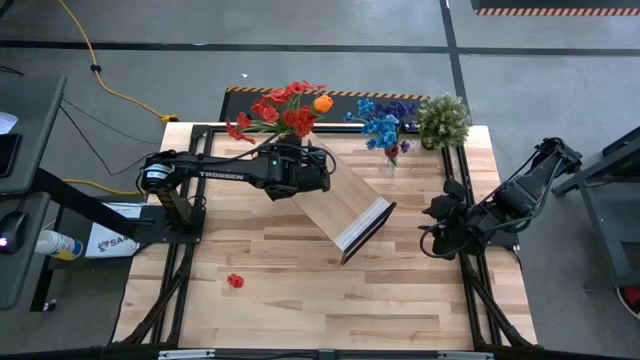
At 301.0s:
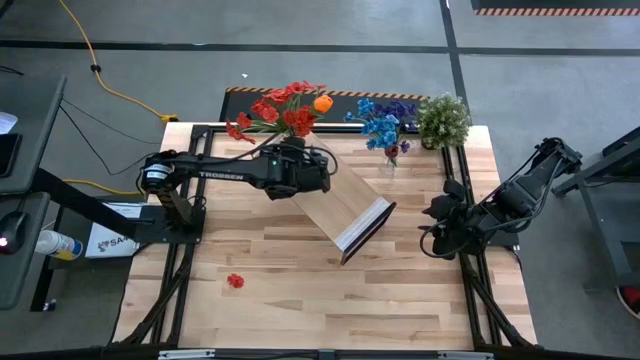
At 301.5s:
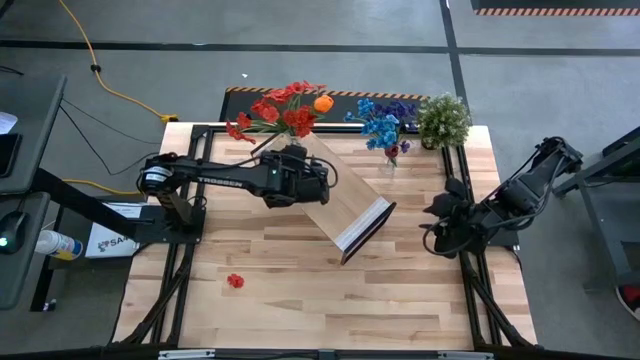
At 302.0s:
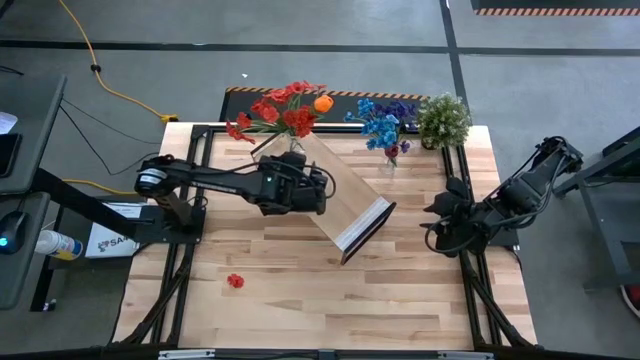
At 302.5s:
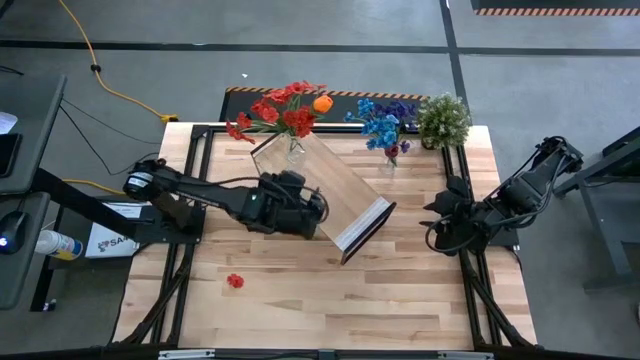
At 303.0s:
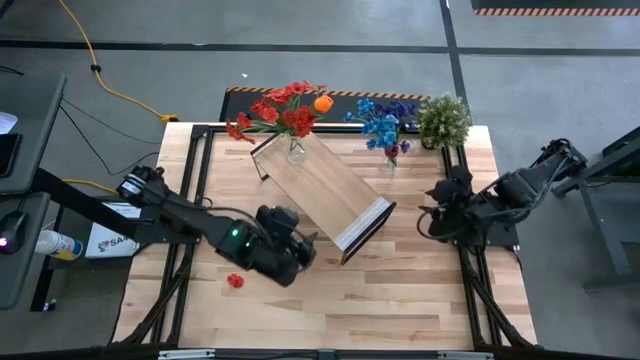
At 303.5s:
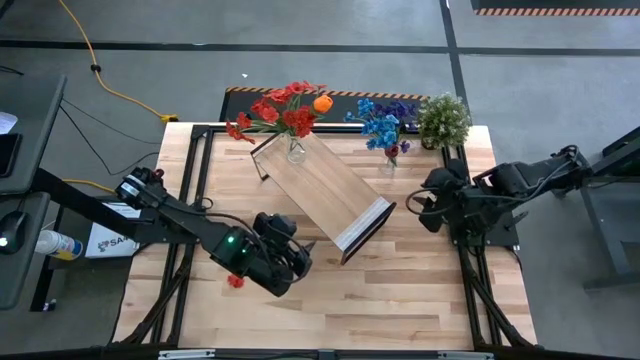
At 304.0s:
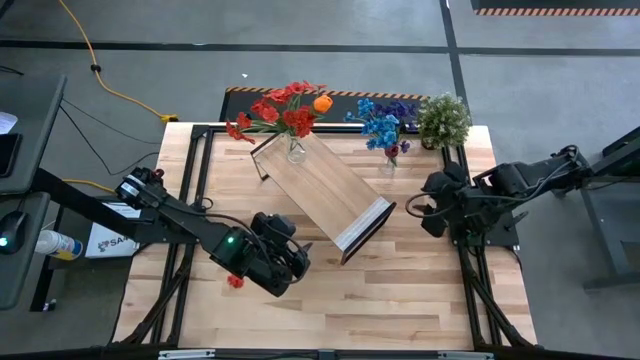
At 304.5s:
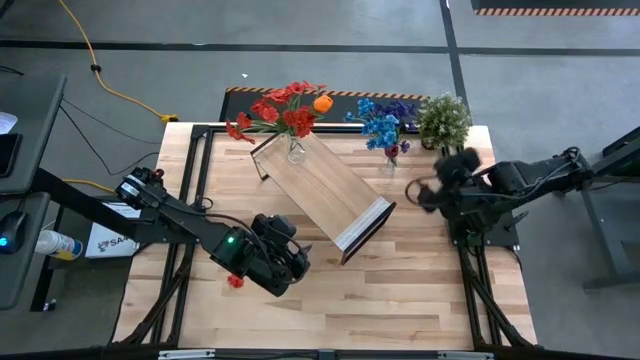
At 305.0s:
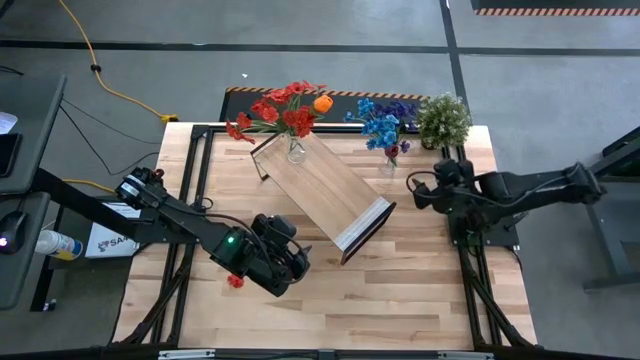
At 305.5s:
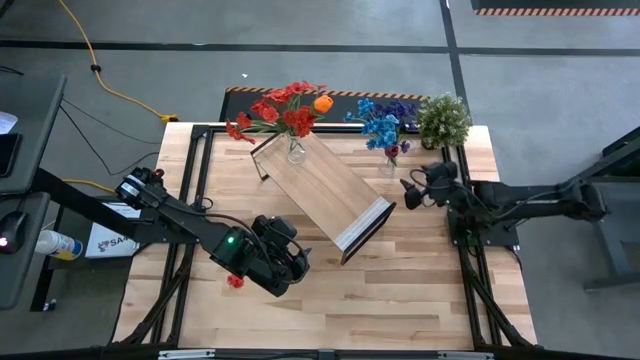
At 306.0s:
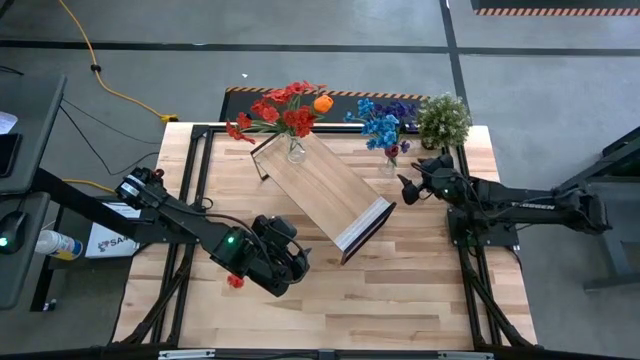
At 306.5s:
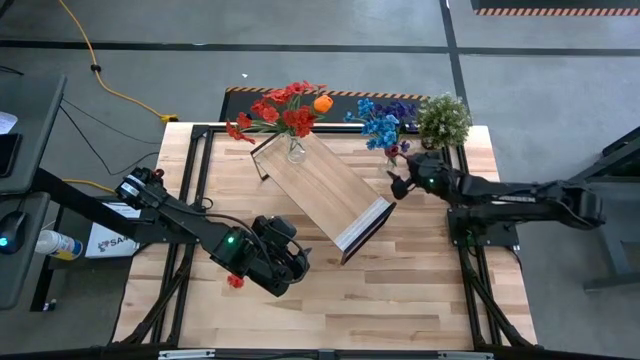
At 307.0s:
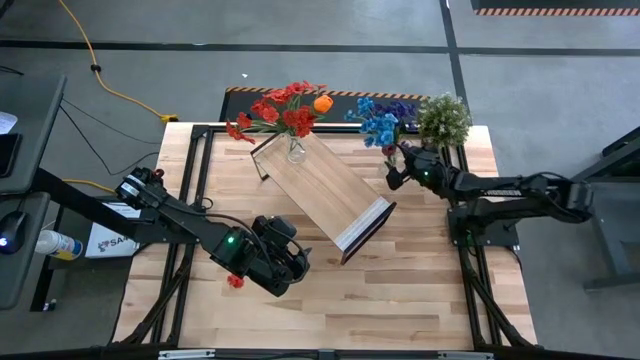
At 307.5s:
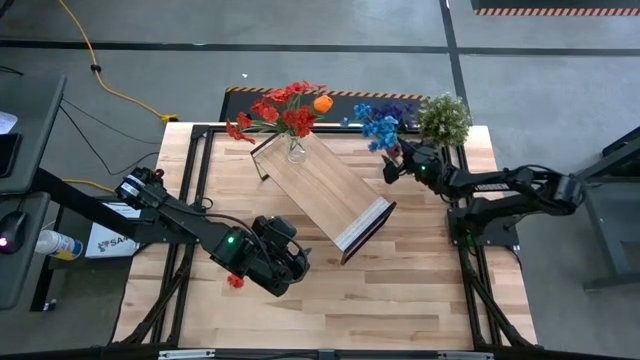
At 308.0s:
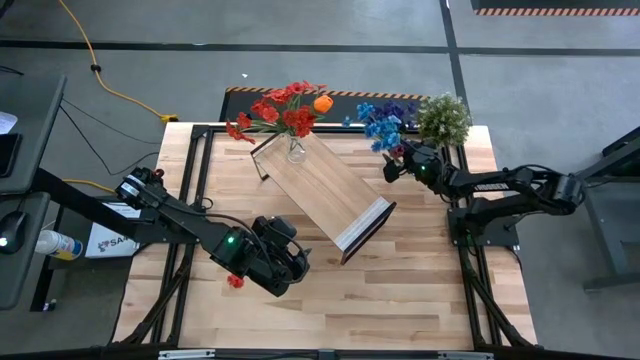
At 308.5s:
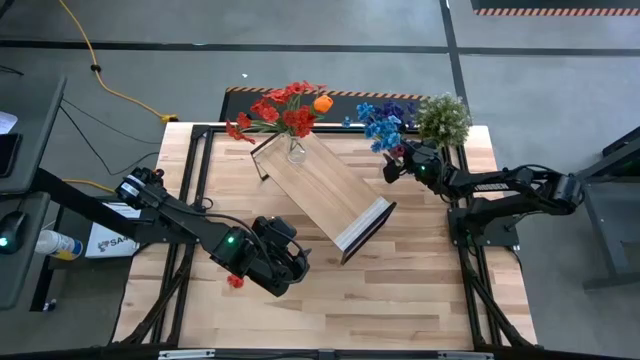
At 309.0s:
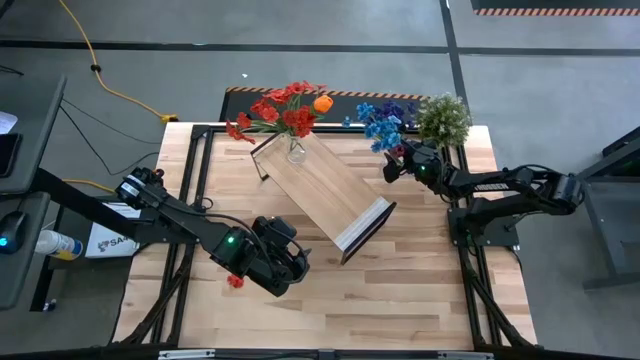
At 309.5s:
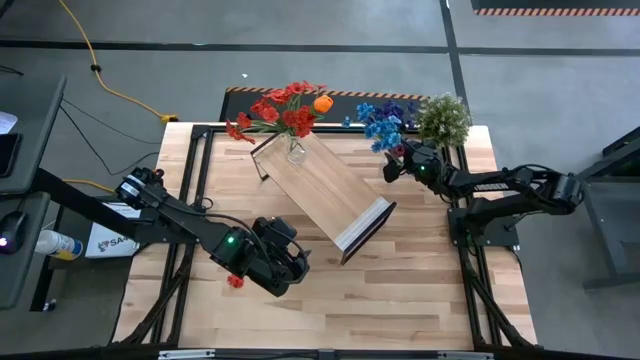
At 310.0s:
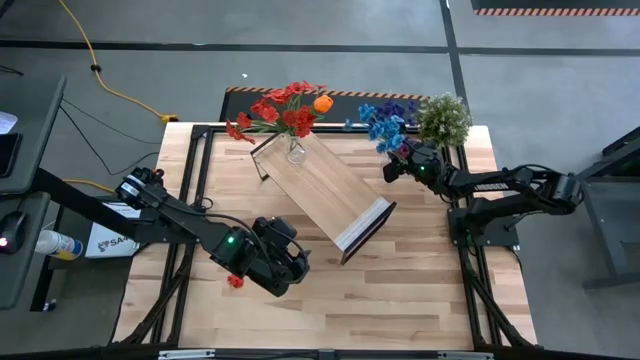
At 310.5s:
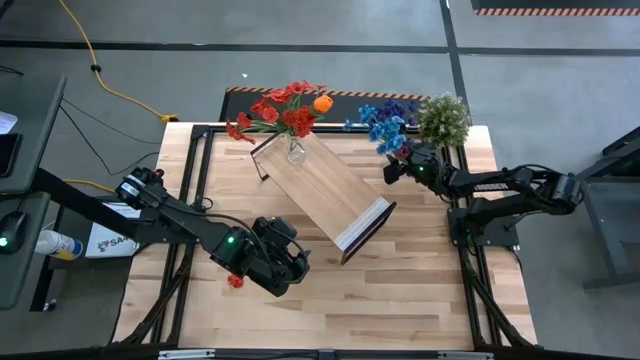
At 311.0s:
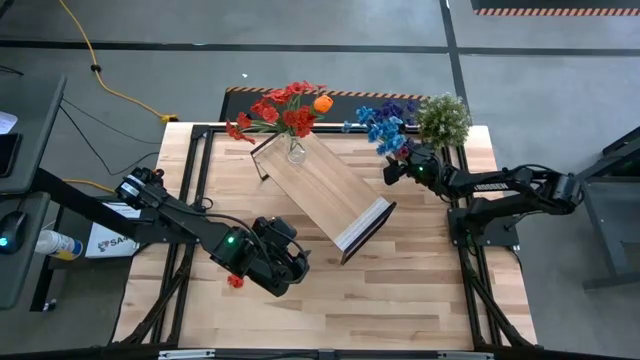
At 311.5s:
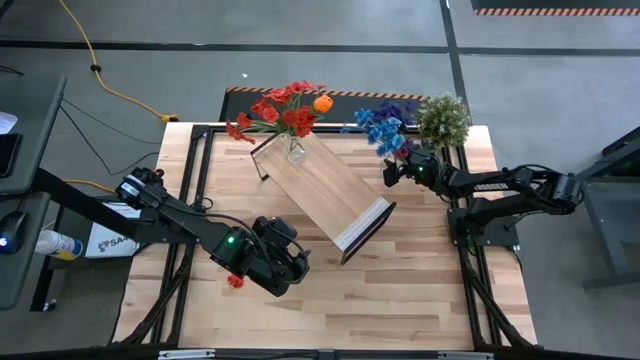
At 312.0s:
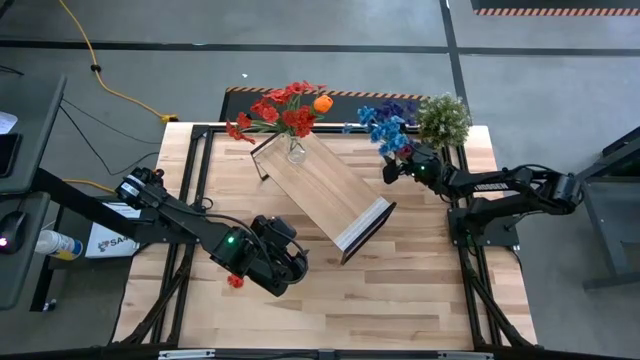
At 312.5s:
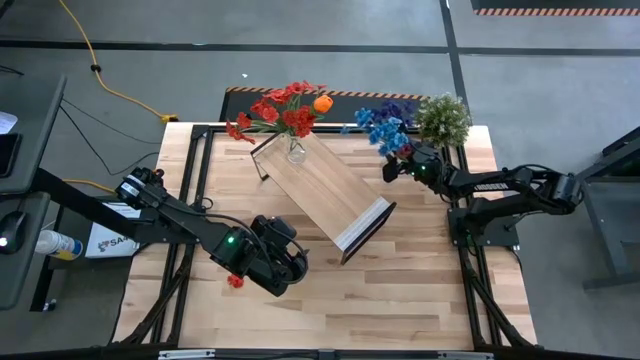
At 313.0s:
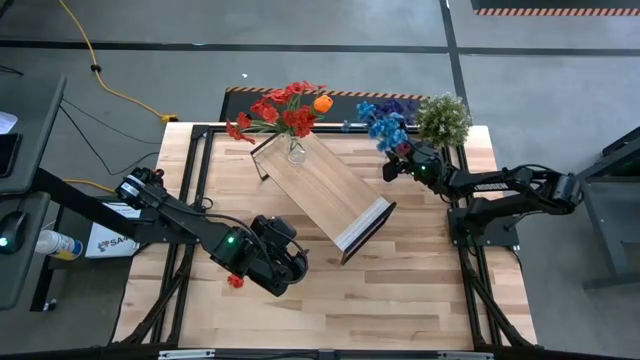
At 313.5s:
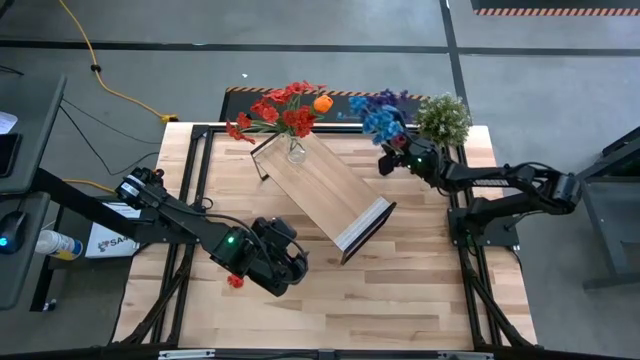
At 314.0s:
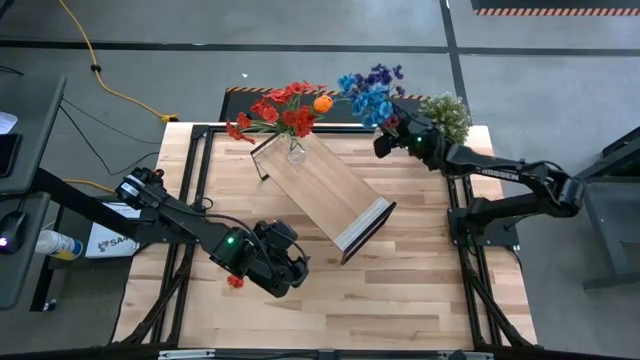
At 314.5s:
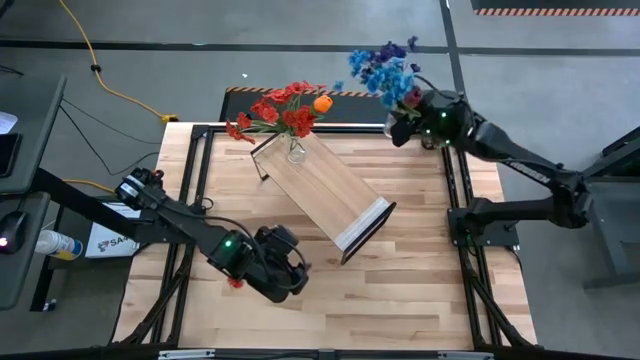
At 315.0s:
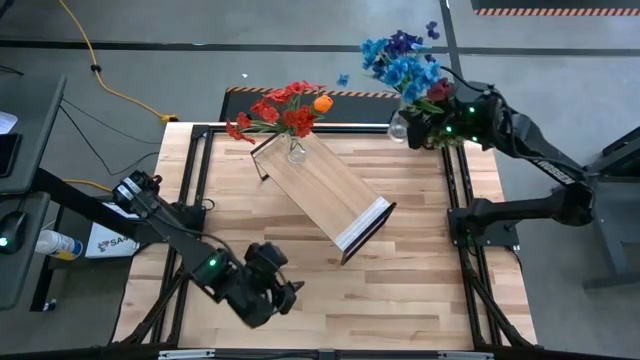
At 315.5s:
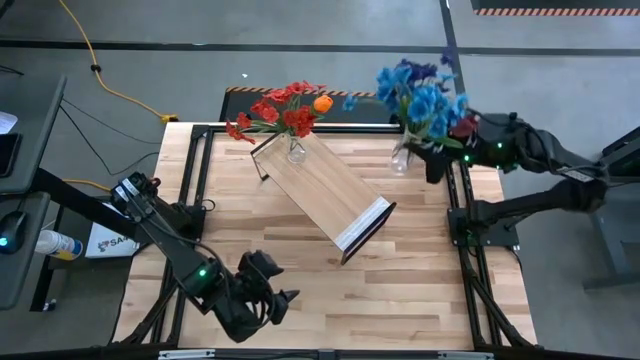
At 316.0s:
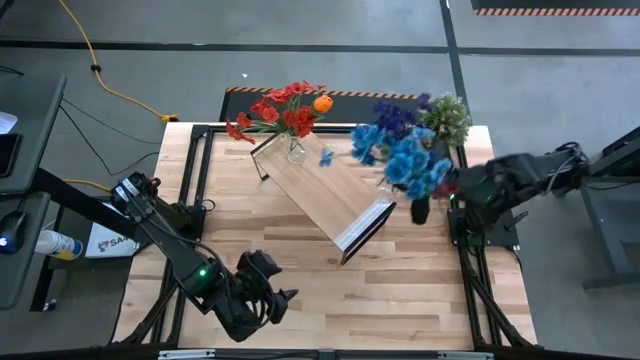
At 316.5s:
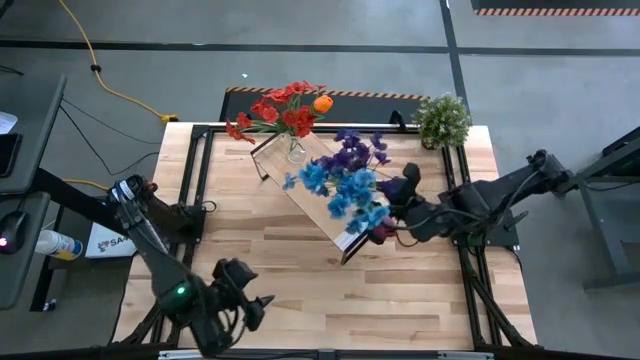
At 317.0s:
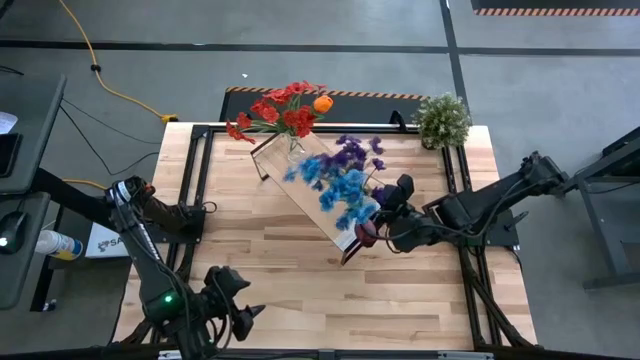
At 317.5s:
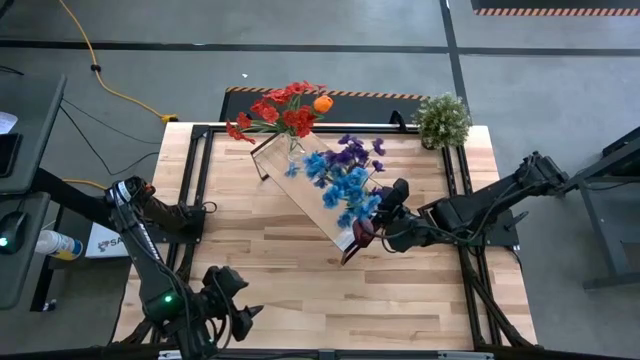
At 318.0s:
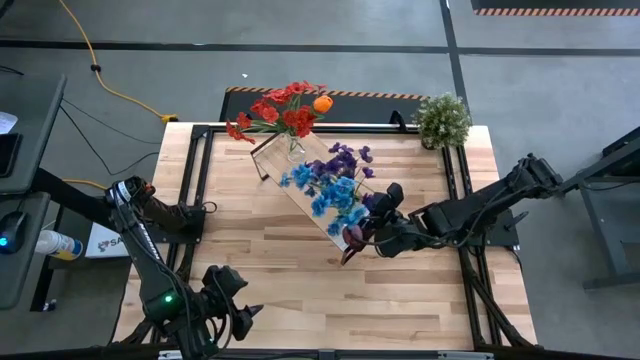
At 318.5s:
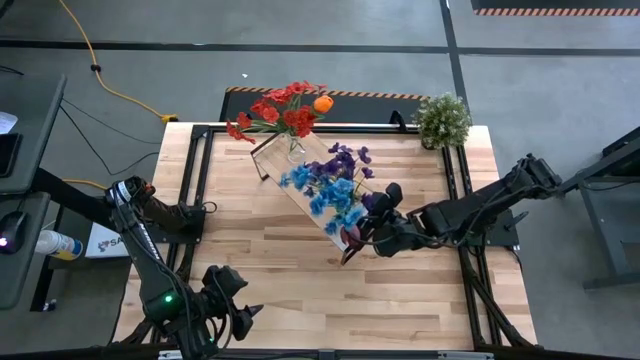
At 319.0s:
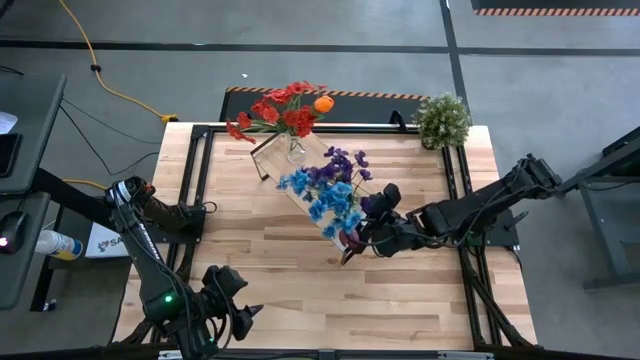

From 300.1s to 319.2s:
Task: Pick and place flowers into a vace then onto a shelf
Put the transparent vase on the shelf

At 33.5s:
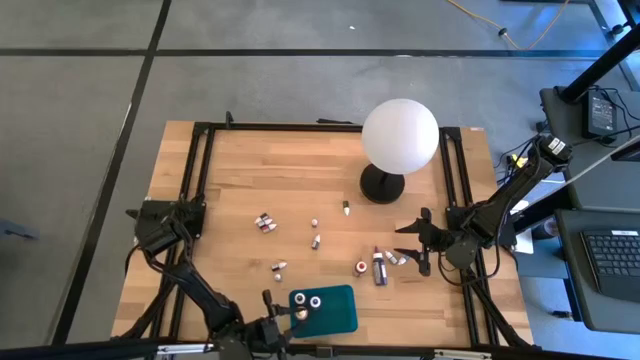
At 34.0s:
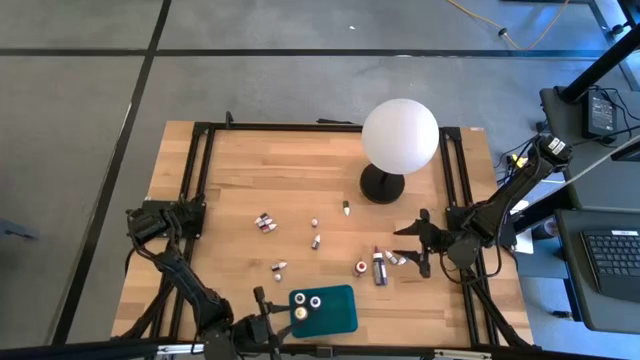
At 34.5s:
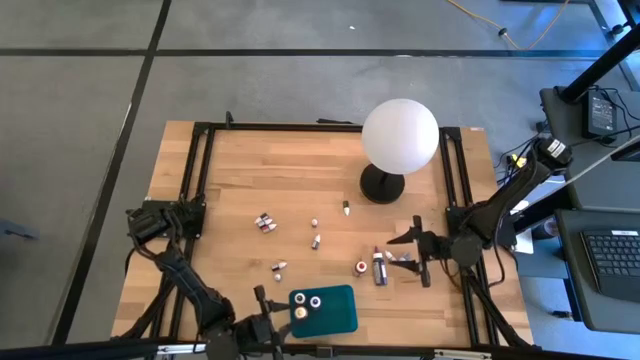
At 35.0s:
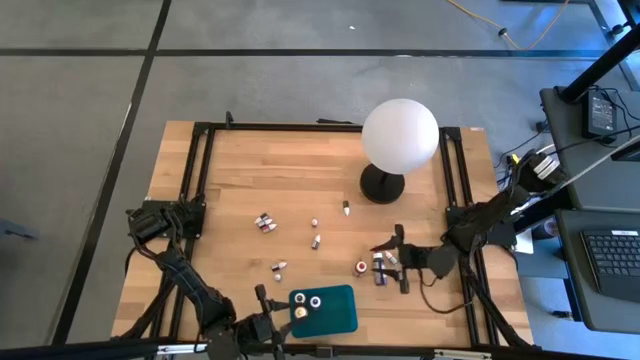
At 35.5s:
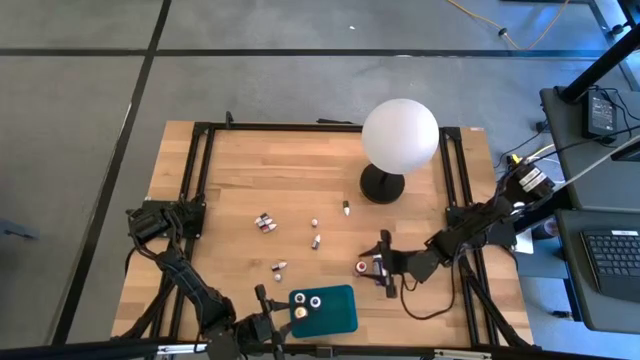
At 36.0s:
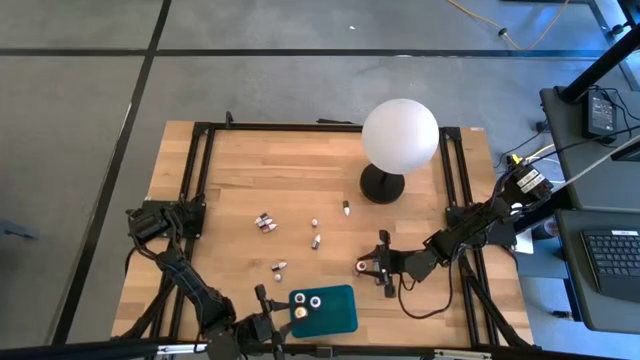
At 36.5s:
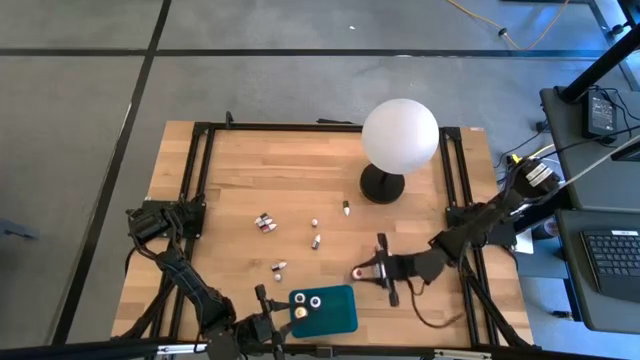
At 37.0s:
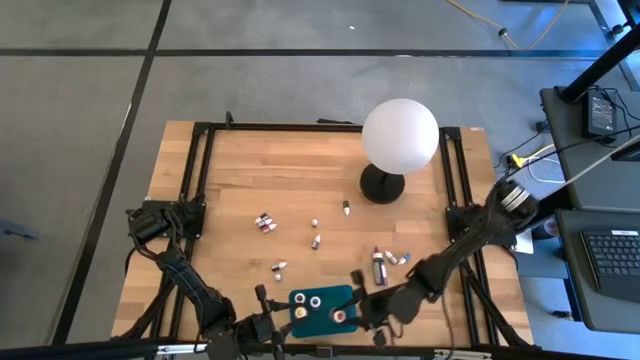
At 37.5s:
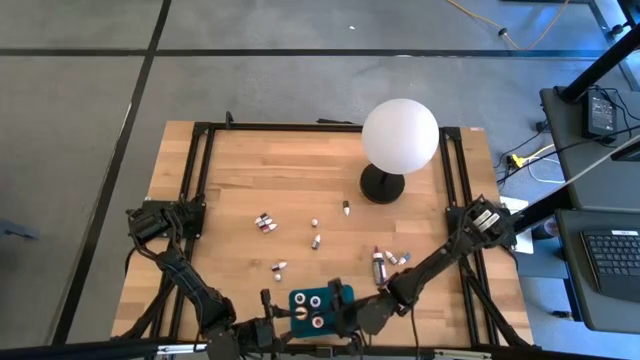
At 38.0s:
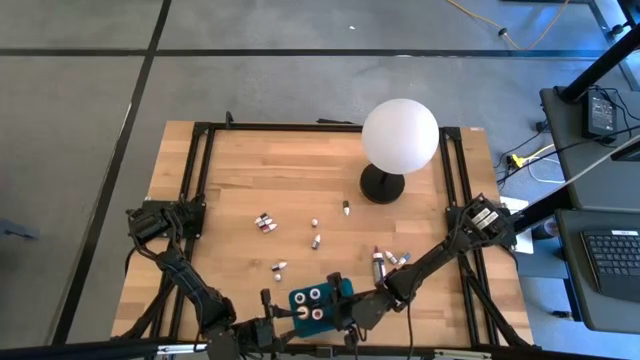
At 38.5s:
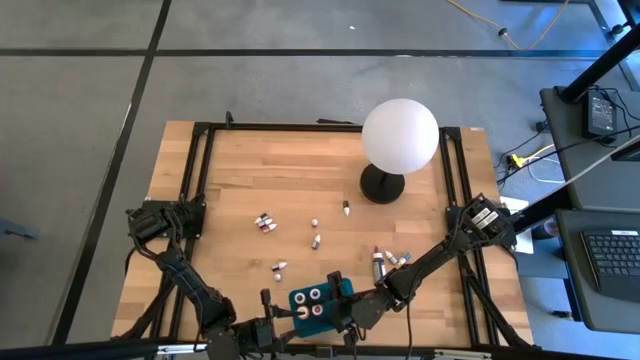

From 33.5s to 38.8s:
Task: Pick & Place food coloring
Put the large red food coloring bottle into the blue bin
